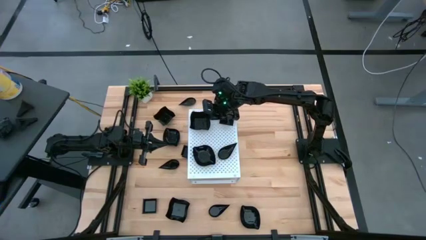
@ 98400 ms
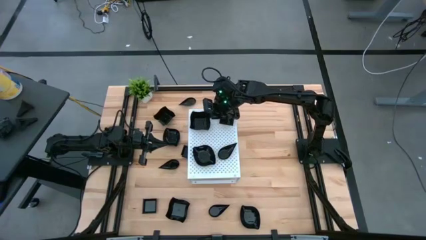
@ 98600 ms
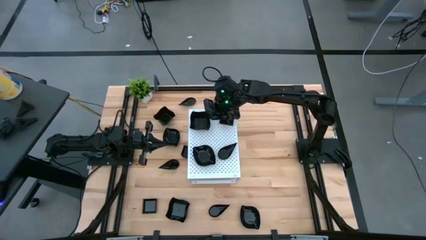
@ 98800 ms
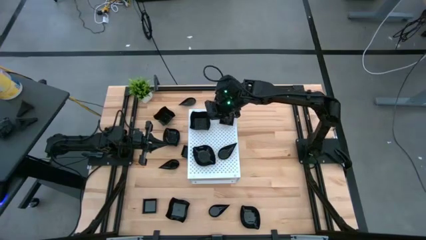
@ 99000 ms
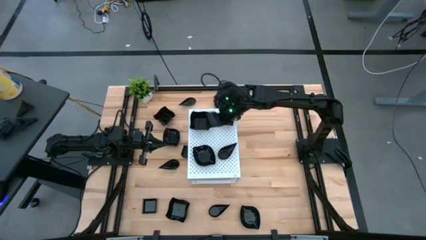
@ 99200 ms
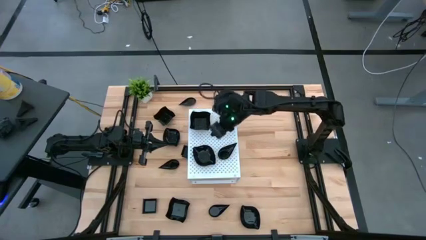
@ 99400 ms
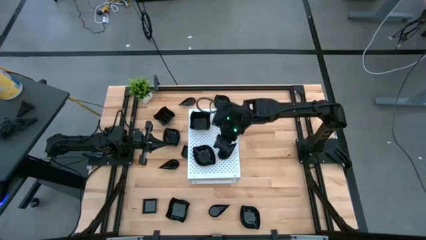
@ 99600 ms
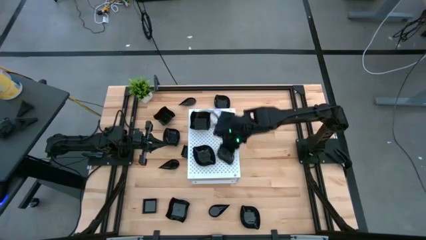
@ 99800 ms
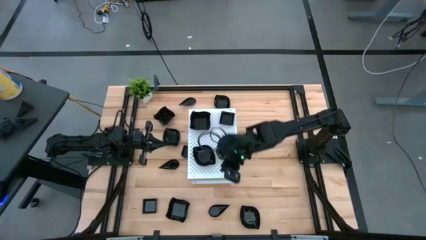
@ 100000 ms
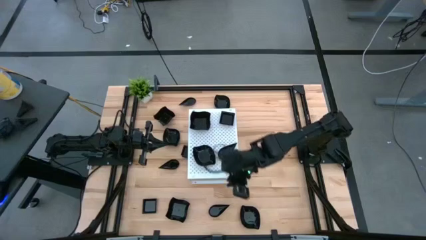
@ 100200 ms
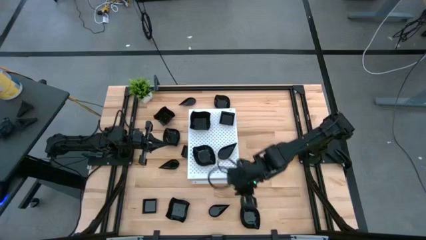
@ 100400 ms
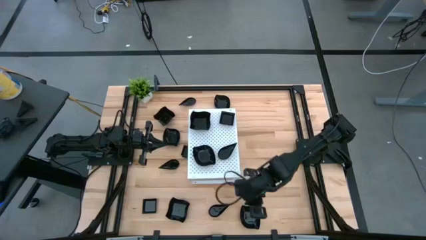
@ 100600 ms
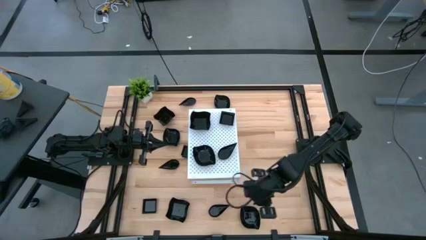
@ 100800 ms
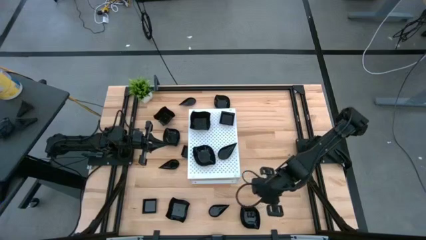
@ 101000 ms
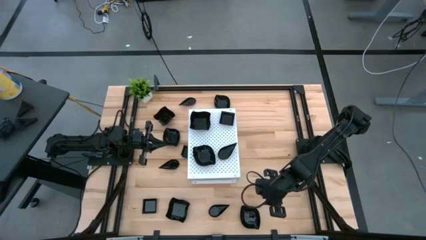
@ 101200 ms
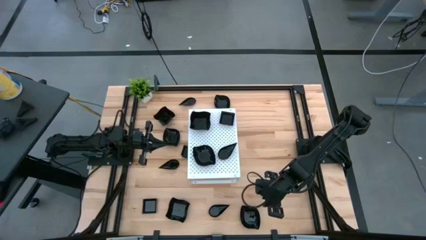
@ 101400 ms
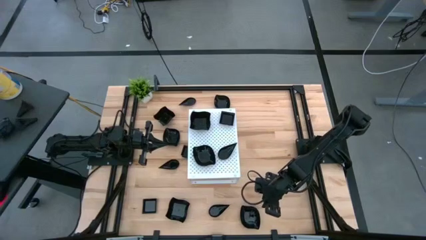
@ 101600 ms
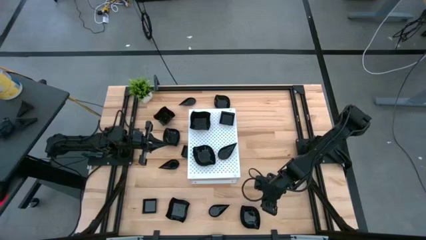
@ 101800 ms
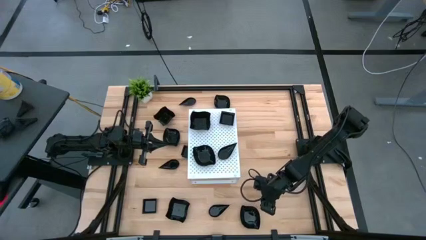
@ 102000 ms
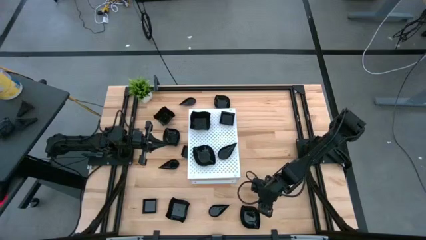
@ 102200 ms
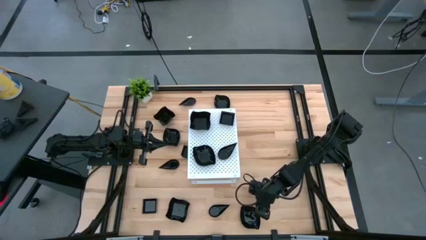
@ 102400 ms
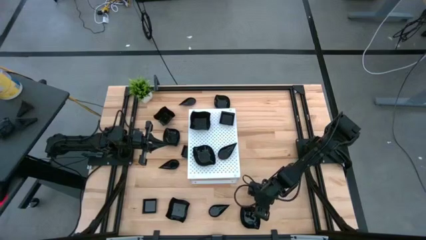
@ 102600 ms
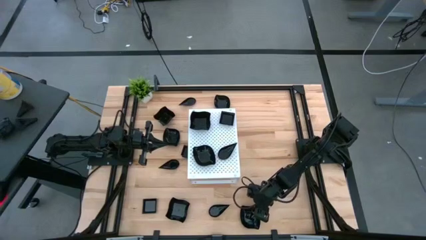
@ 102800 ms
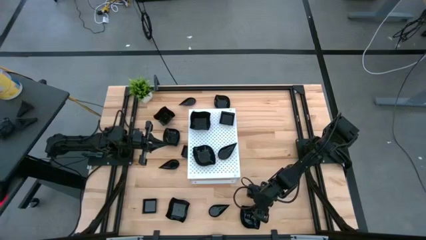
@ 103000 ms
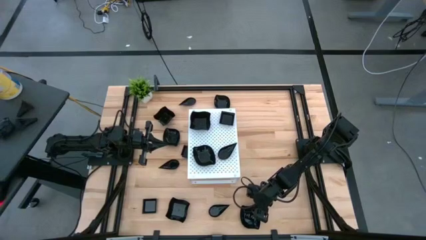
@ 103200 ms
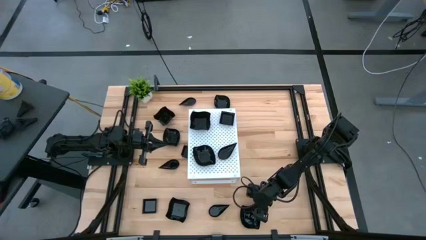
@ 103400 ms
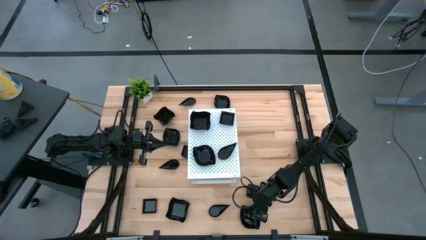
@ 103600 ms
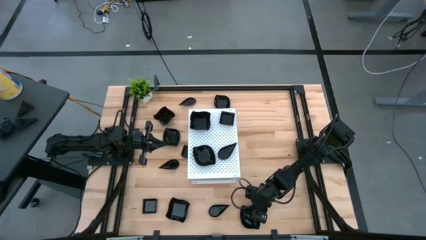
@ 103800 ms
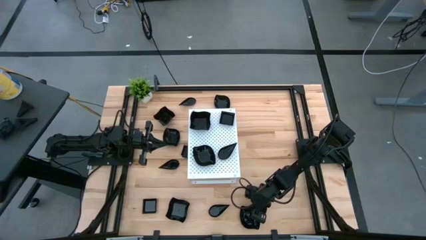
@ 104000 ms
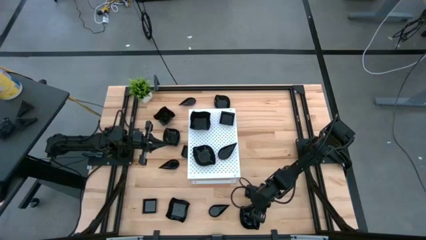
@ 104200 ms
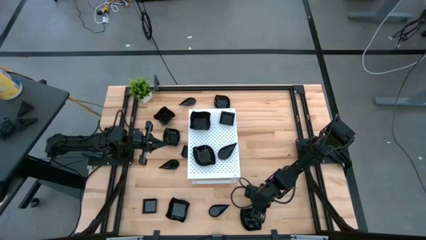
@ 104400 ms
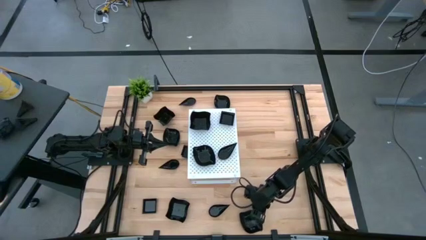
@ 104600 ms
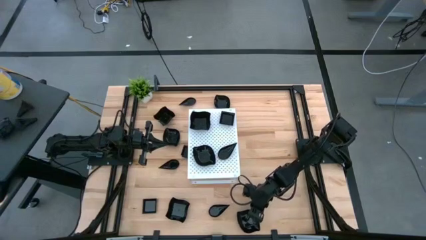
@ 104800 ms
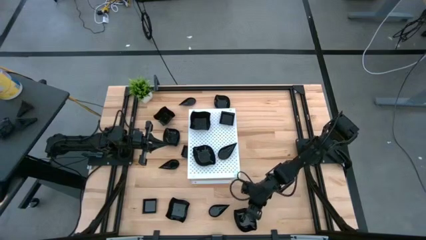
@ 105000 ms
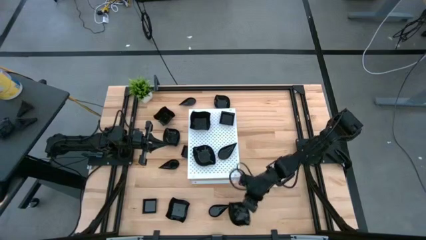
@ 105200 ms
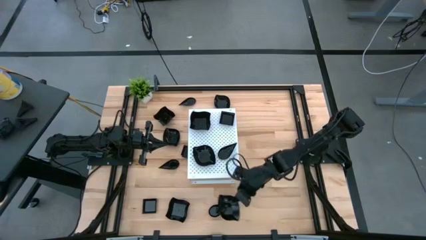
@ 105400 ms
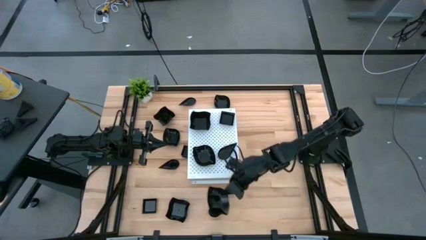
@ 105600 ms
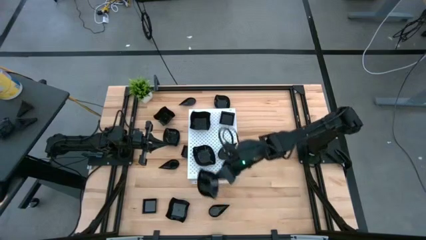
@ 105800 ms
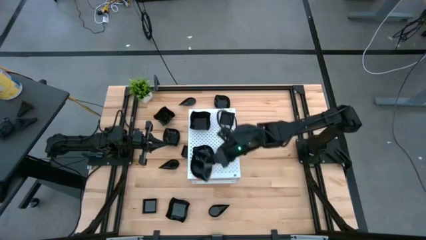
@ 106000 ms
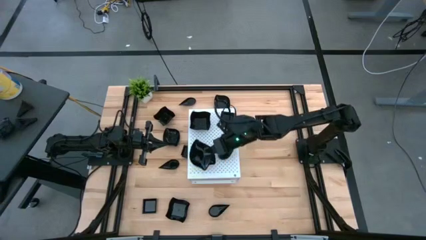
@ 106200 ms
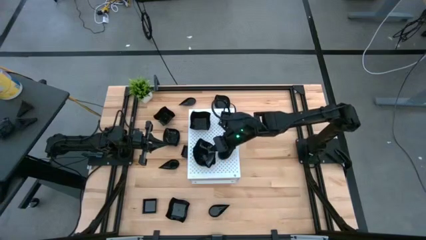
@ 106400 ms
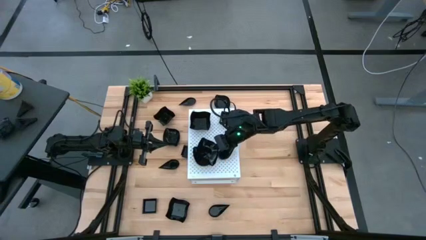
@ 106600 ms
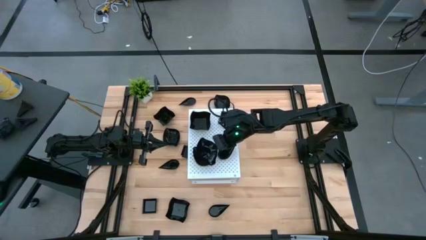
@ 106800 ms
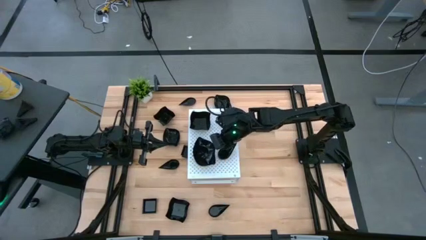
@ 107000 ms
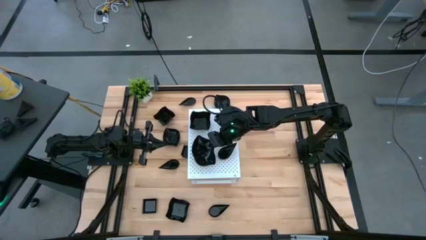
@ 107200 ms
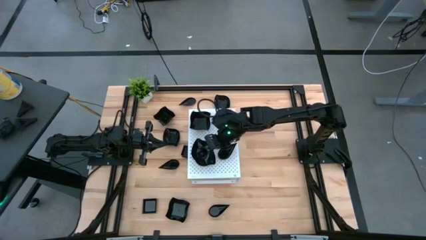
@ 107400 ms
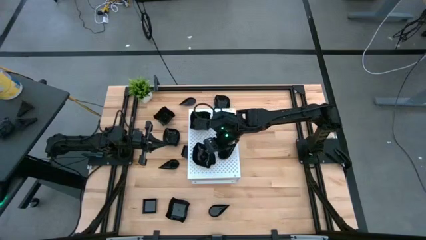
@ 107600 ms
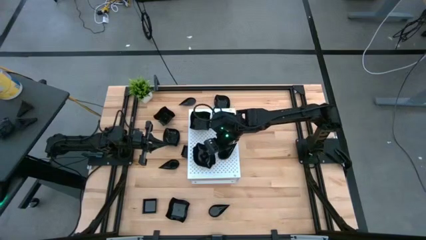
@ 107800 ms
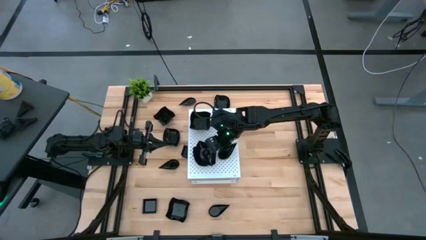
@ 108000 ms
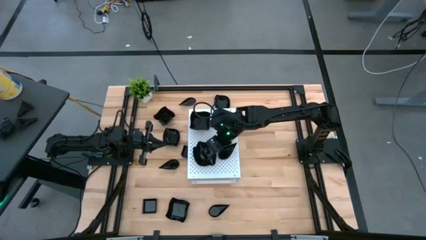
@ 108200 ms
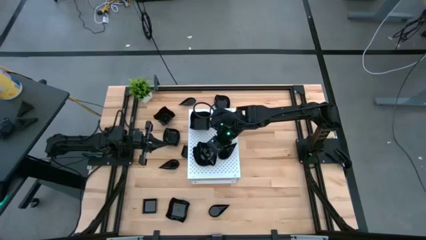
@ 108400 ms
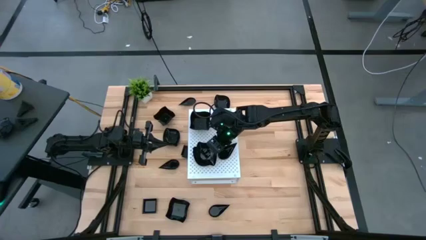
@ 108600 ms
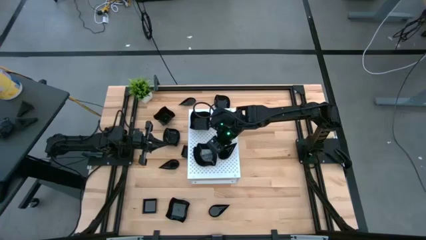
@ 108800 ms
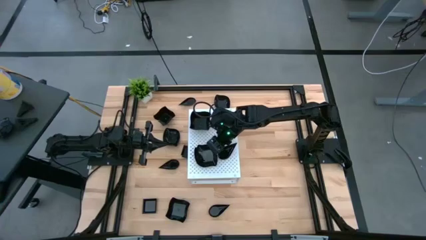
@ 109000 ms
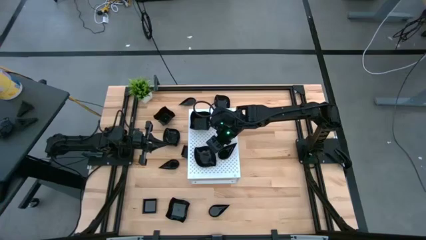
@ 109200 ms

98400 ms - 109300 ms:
Task: Pick & Place Mini shaped plates
Stack the black leaf shaped plate on top of the other black leaf shaped plate on the shelf
